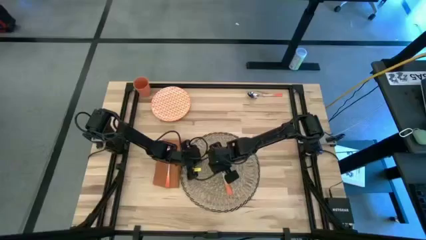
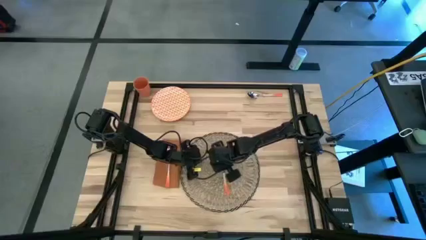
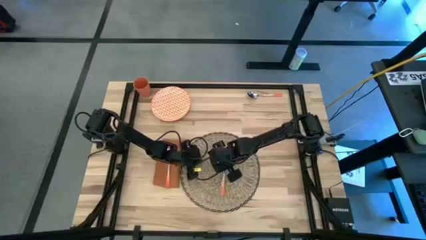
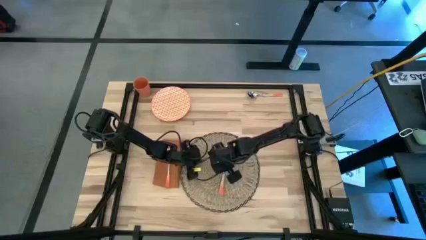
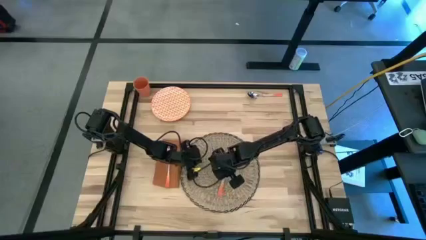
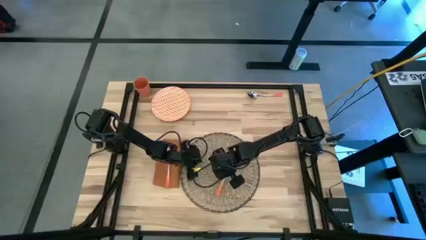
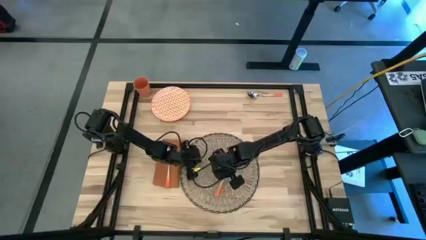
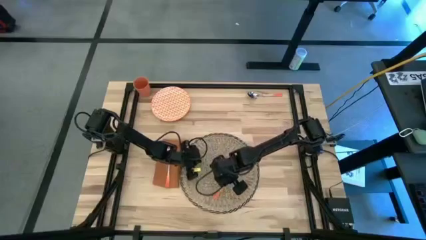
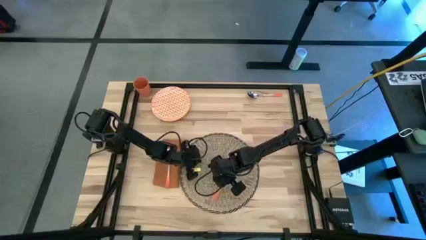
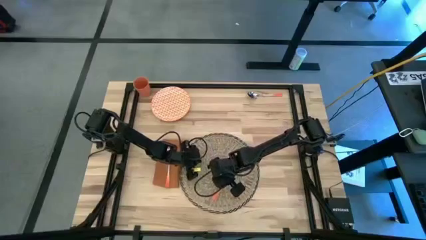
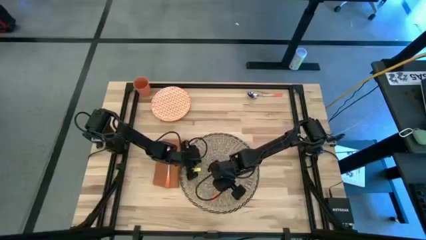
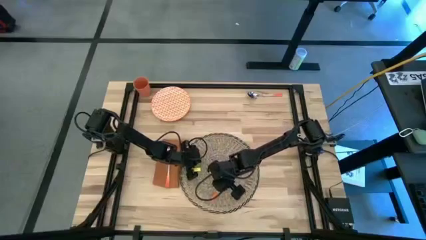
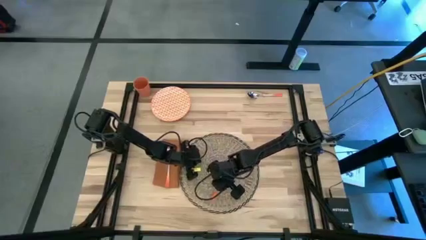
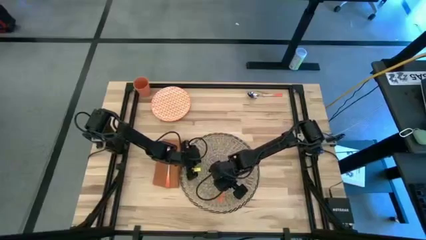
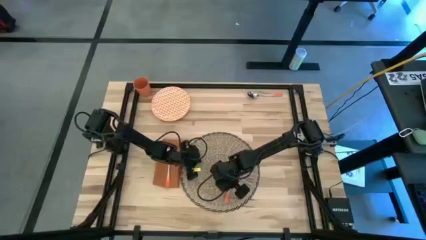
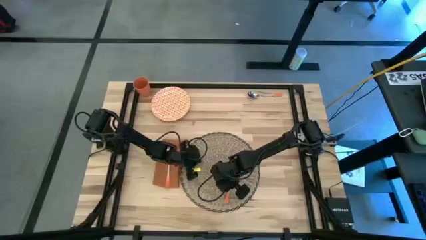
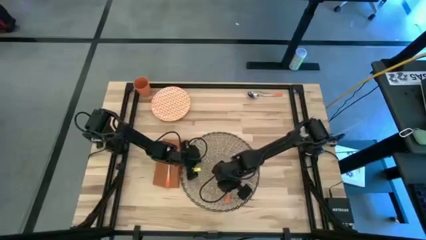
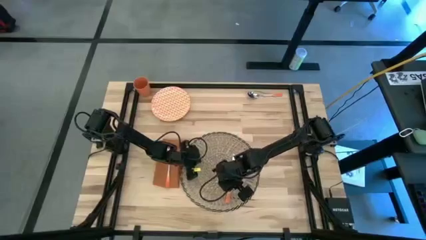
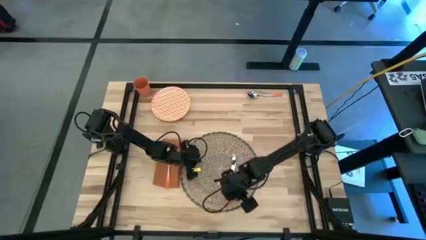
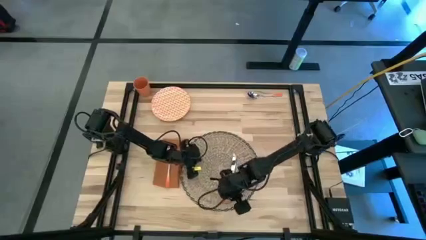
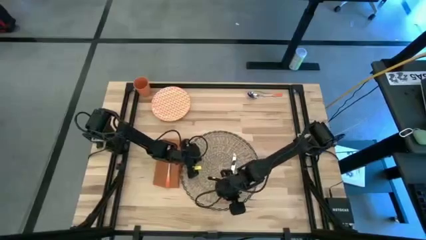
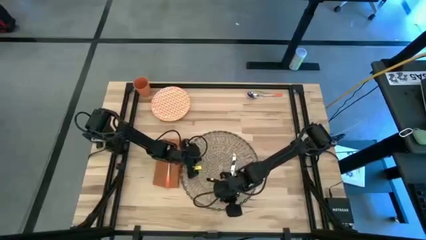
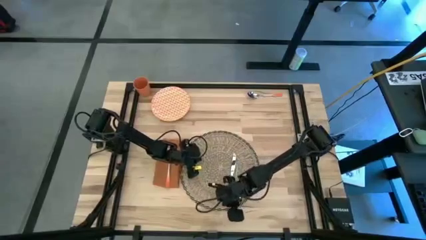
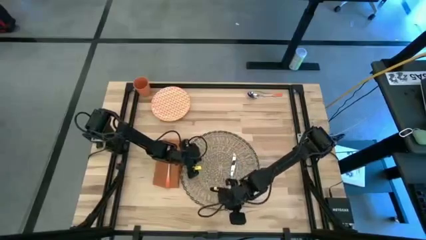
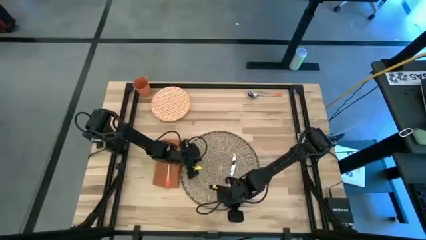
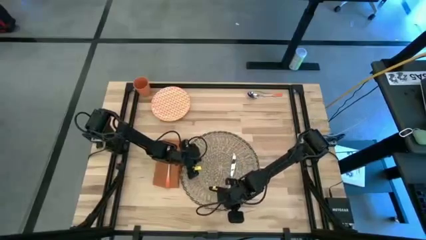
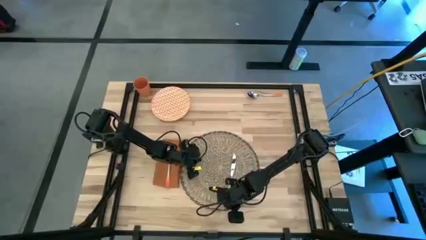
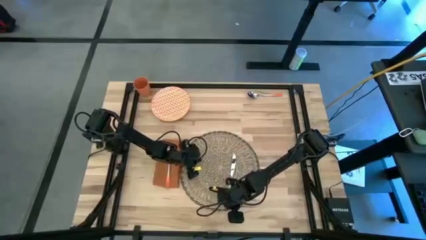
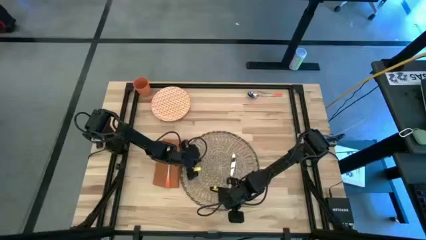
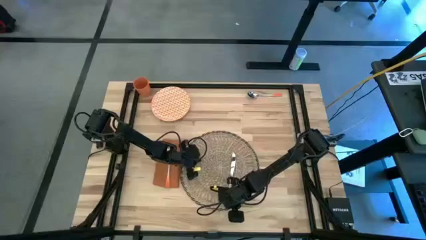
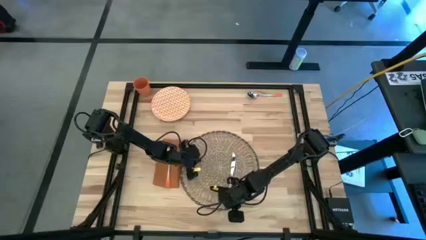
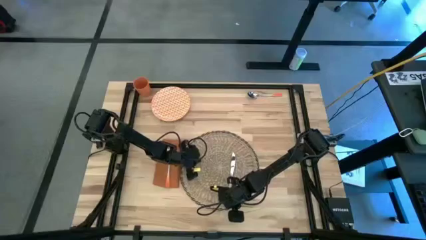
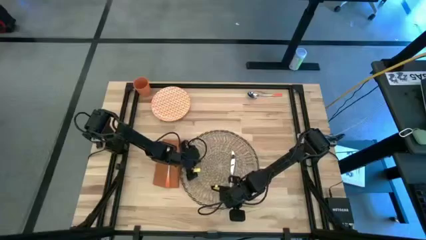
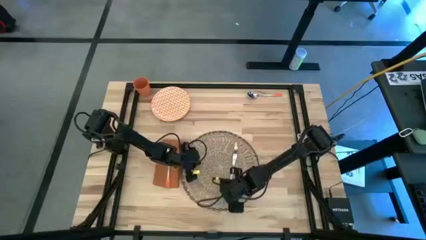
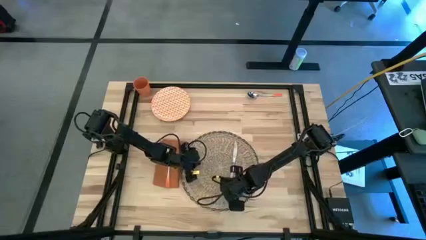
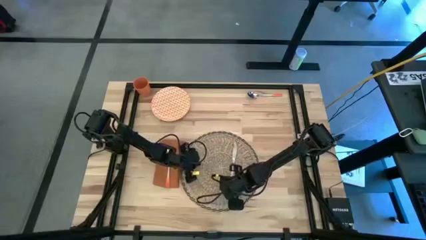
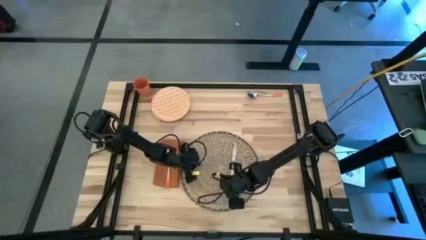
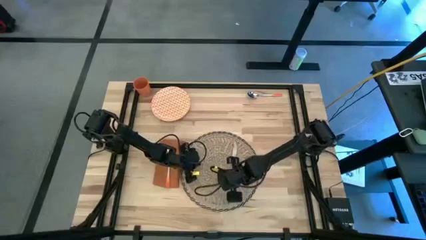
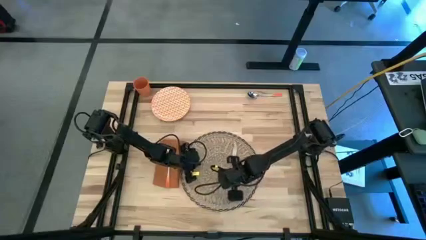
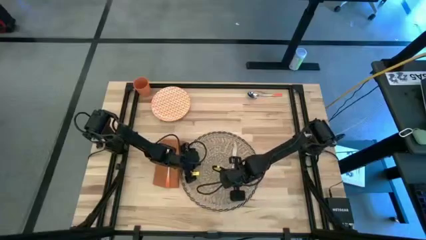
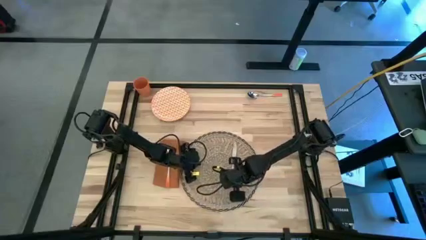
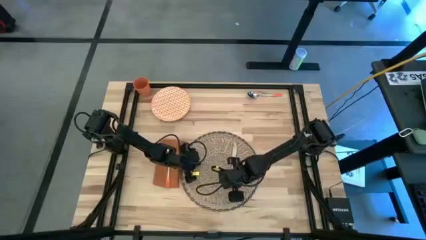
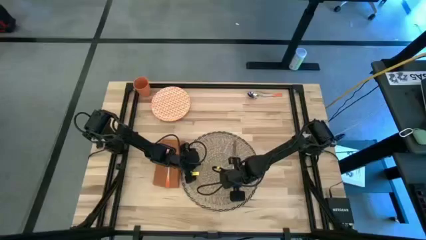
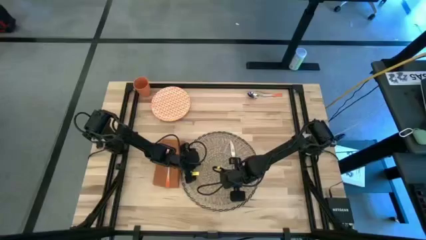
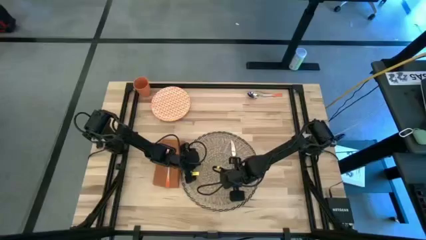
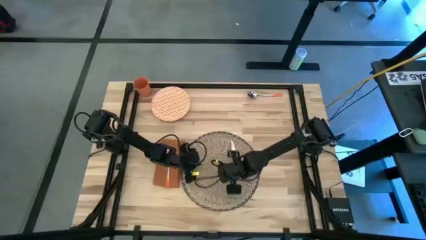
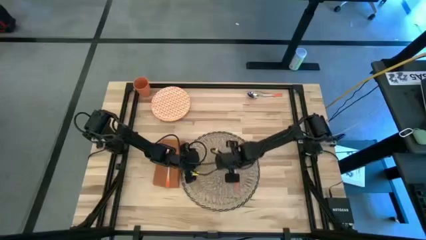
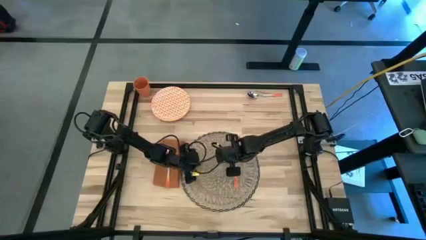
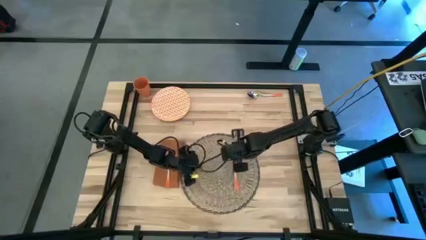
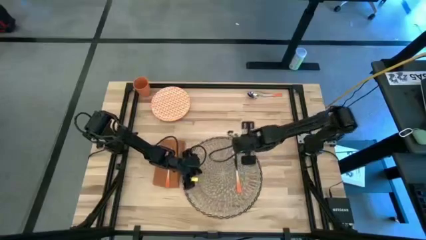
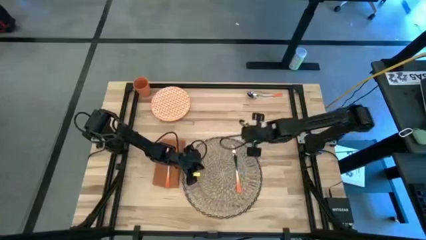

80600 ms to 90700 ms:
Task: Set table place
Put the orange table knife to the right of the brown table mat

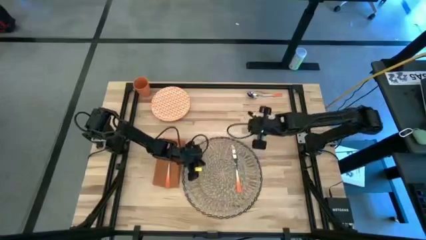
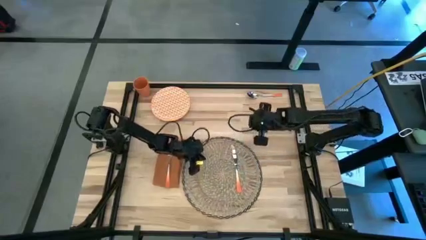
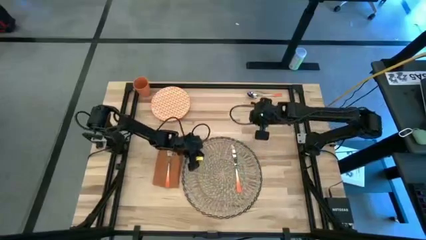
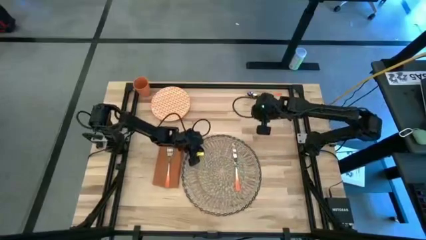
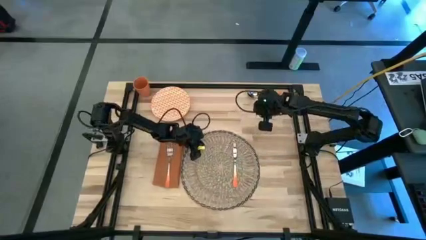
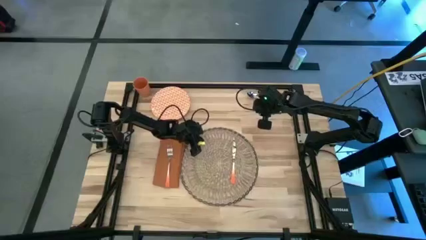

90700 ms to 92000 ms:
Adjust the brown table mat

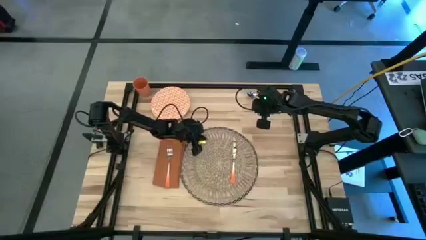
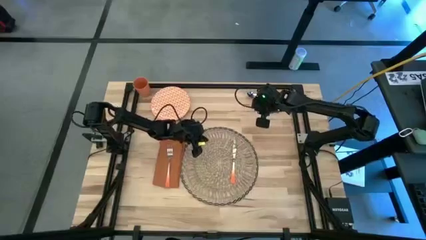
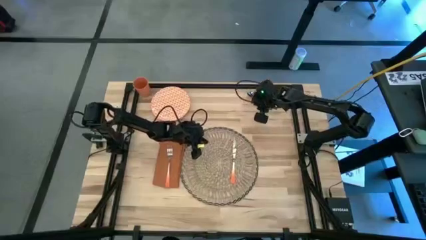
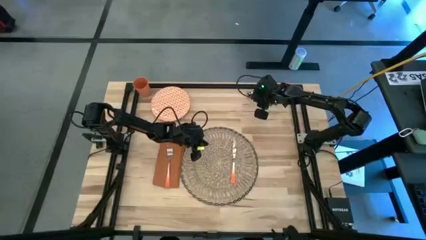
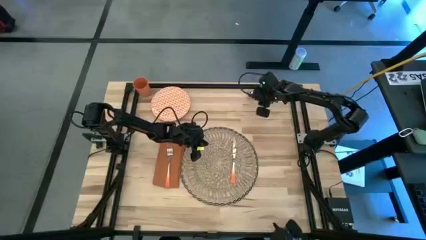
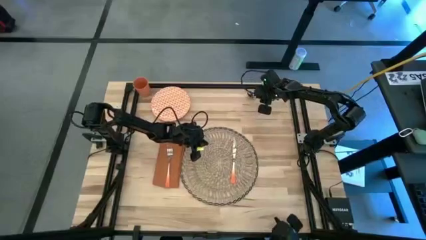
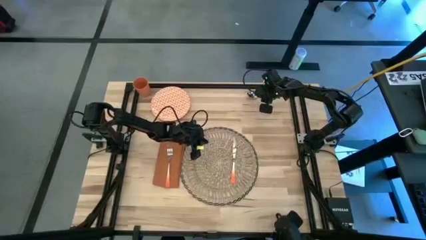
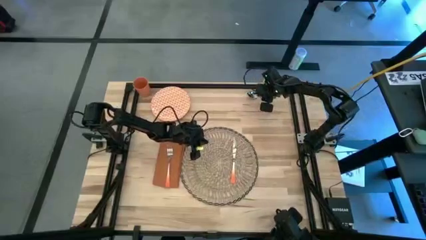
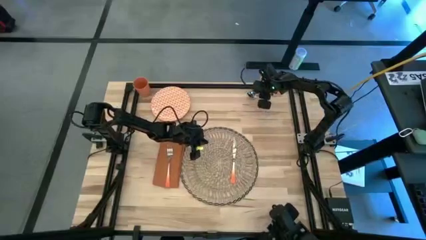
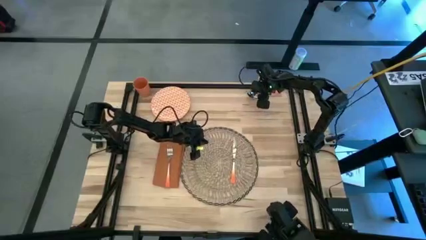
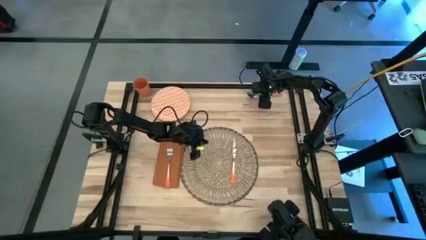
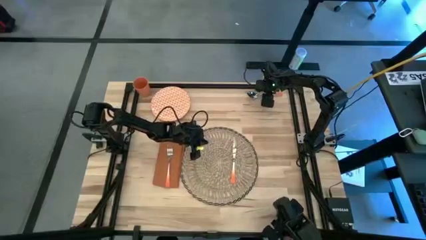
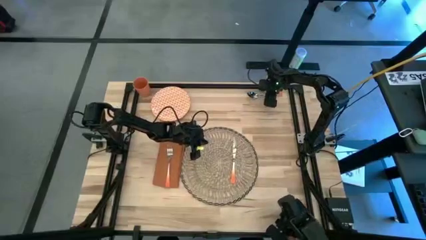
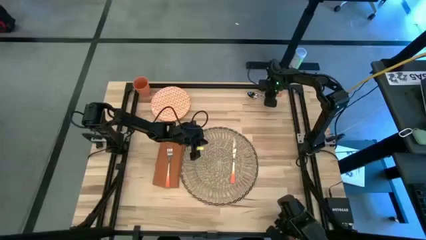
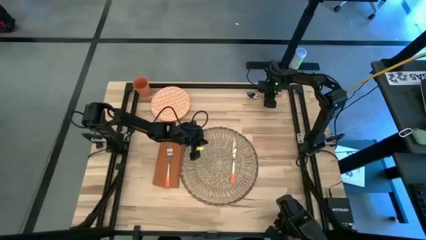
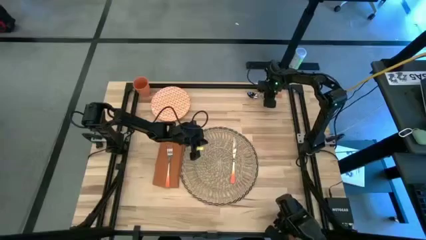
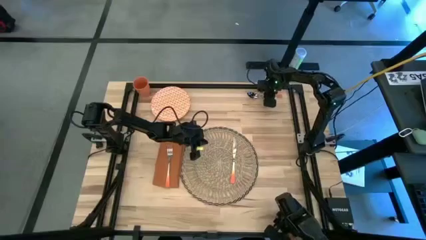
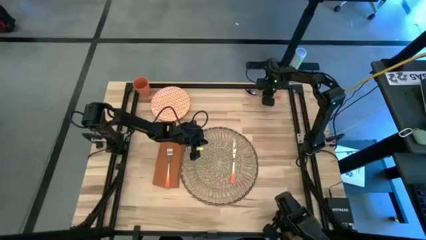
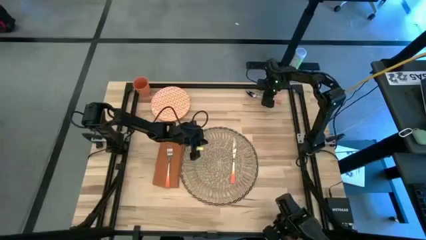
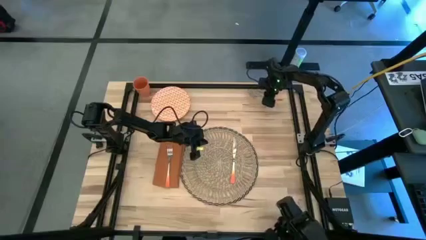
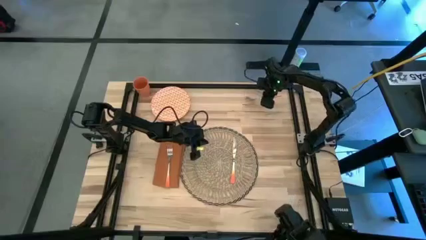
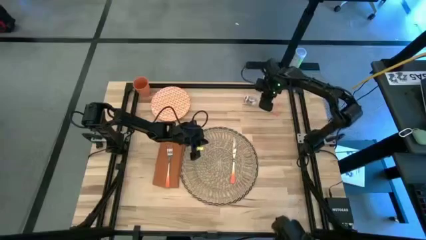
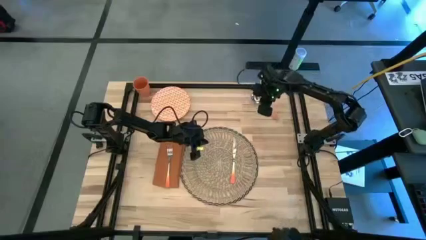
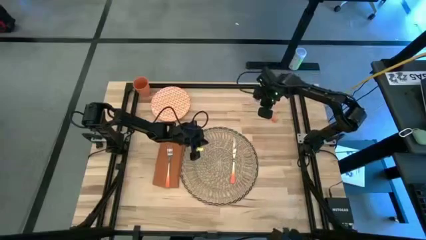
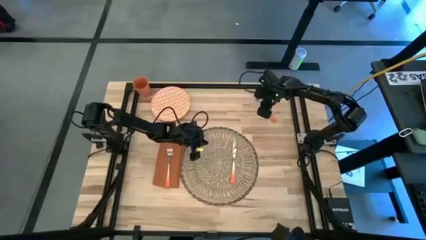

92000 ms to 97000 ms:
Put the orange spoon to the right of the orange table knife on the brown table mat
